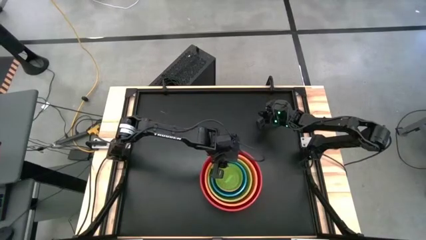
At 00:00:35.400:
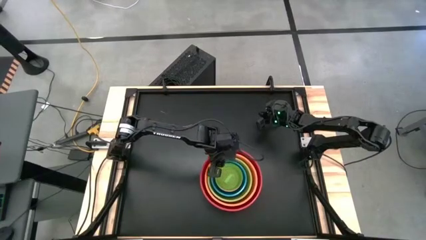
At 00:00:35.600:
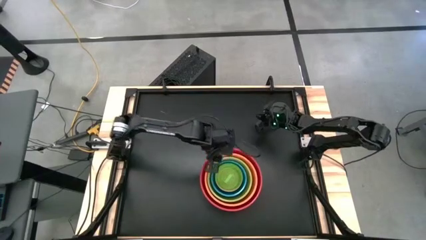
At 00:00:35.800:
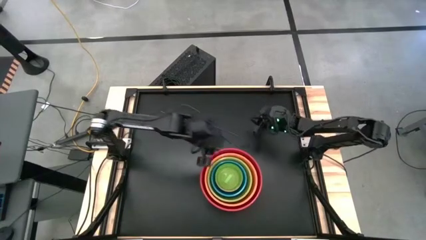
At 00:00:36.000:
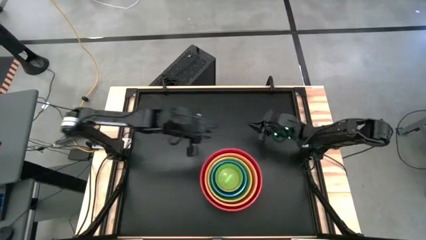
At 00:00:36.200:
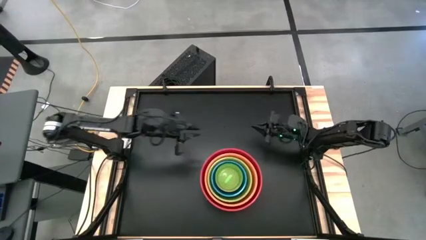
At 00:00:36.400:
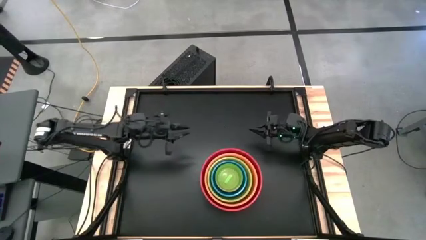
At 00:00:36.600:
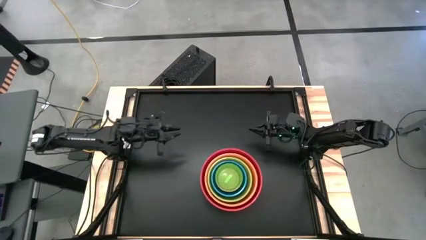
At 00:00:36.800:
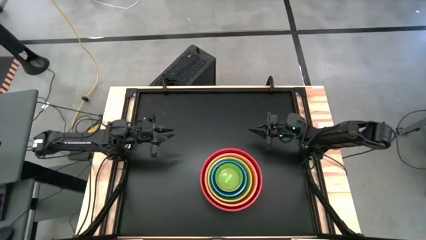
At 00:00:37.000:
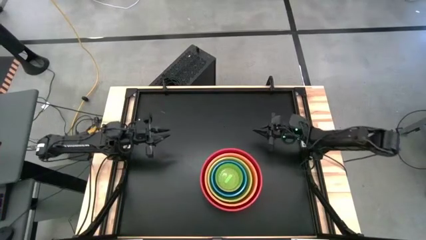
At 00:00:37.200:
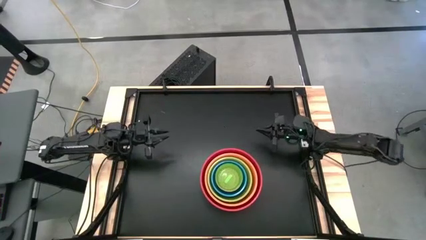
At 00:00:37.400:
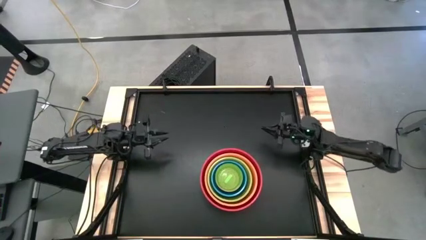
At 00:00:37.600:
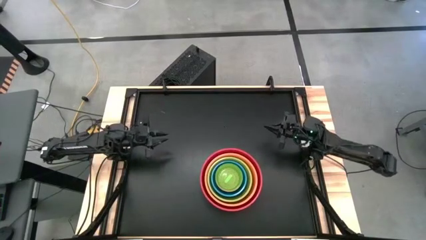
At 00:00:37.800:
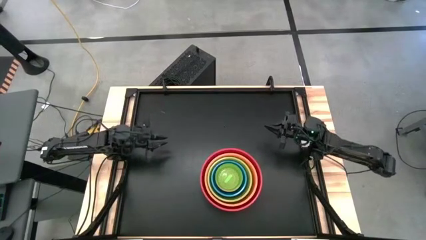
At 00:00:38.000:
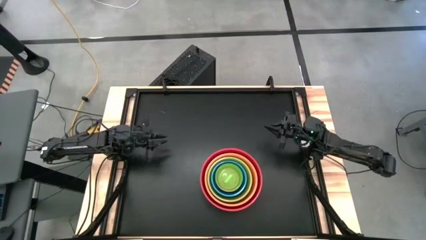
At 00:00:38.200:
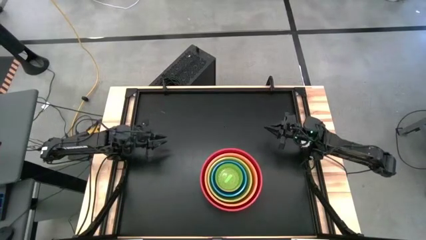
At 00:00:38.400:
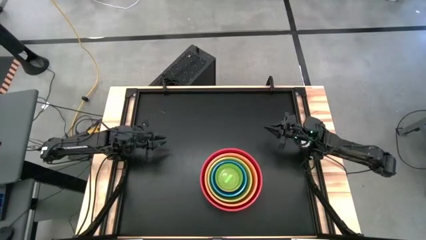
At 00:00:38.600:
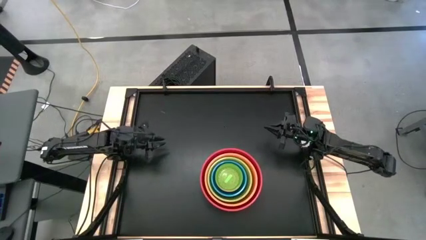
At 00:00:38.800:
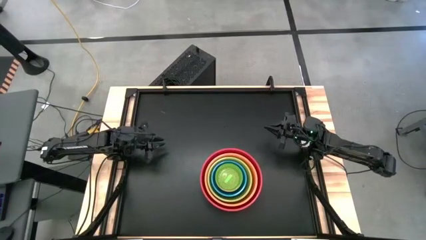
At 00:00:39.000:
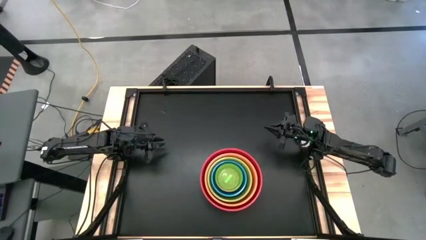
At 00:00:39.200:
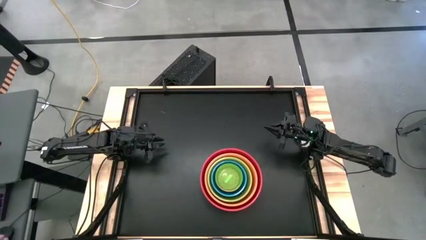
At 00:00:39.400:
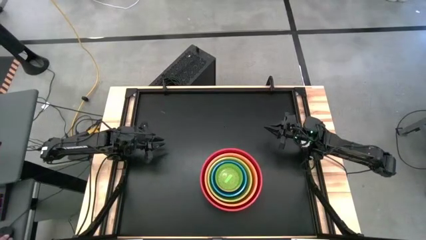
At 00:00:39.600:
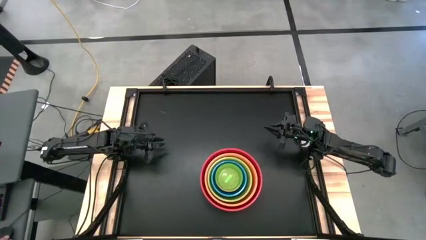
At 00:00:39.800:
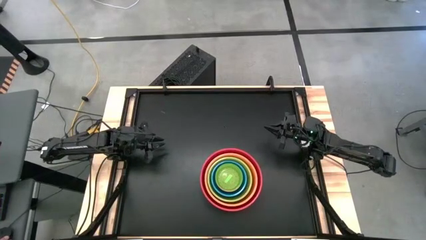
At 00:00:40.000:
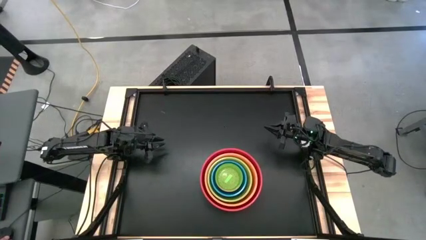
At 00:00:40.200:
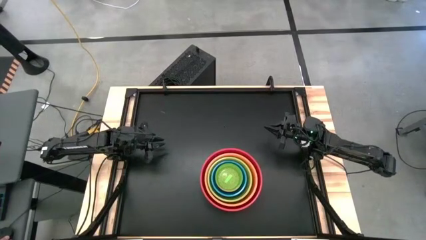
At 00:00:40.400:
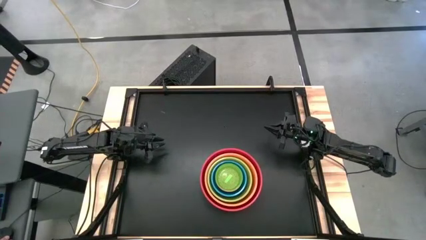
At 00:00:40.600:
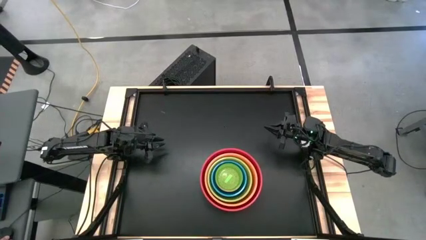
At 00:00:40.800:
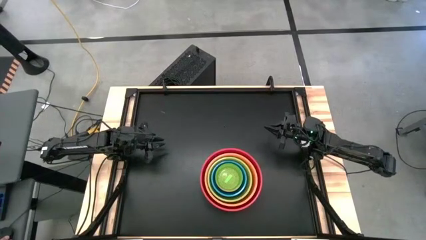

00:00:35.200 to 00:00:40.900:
Return to Home Position
